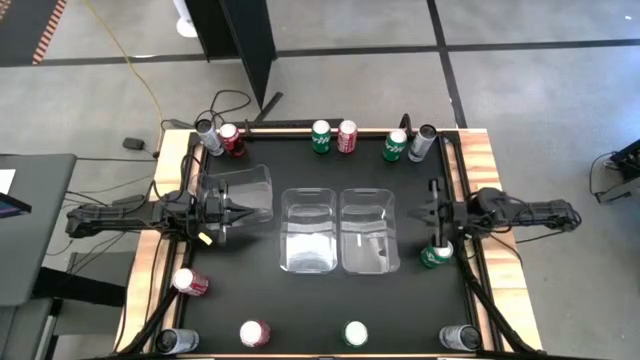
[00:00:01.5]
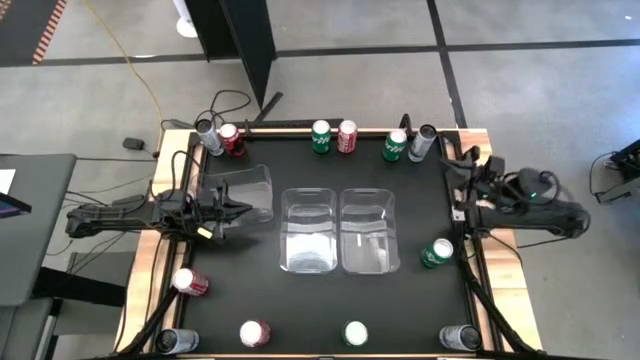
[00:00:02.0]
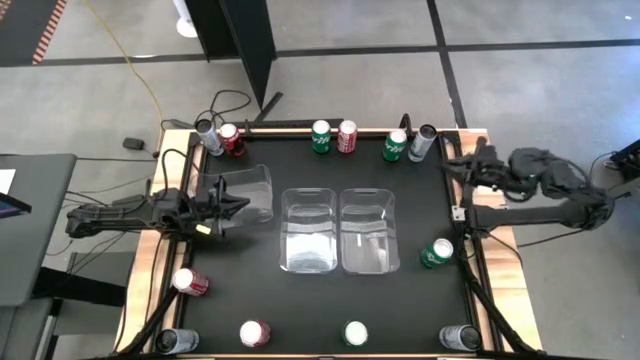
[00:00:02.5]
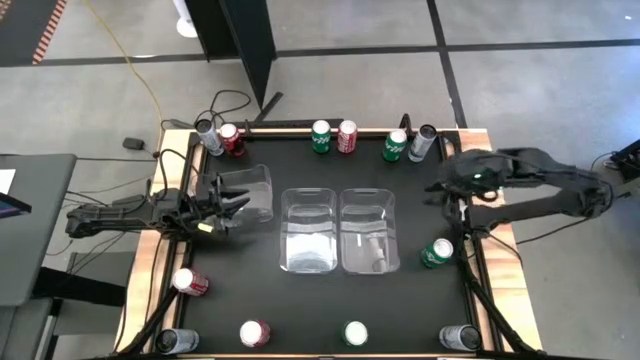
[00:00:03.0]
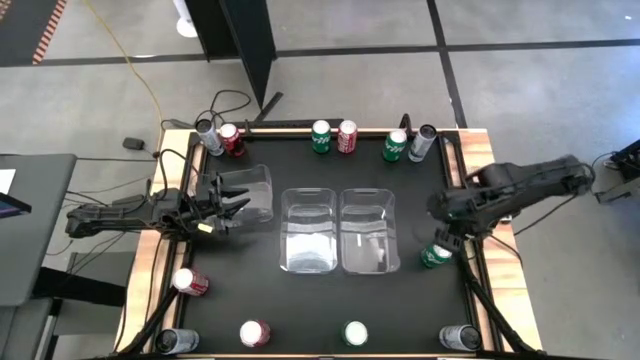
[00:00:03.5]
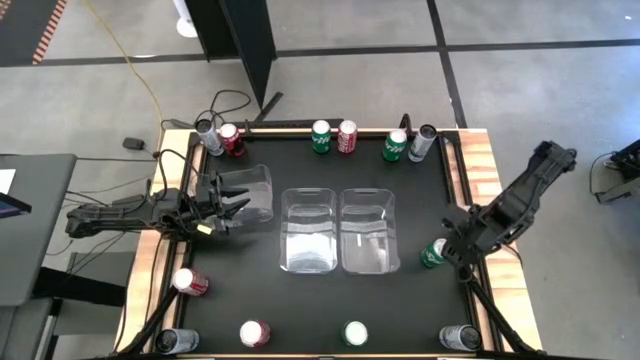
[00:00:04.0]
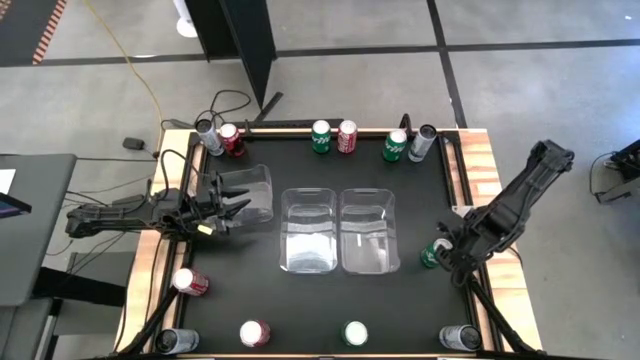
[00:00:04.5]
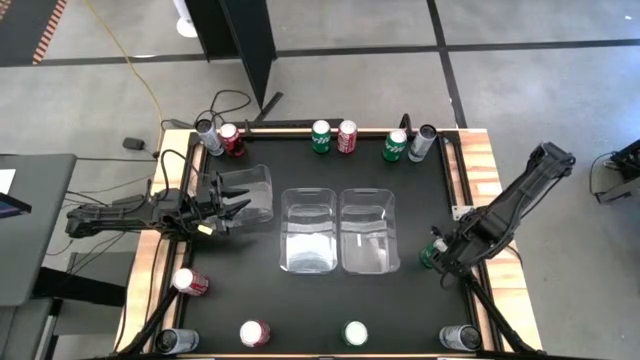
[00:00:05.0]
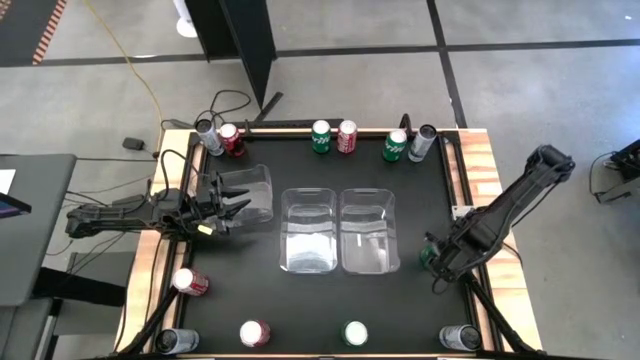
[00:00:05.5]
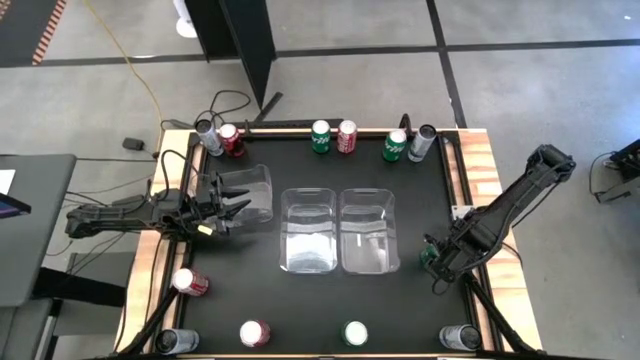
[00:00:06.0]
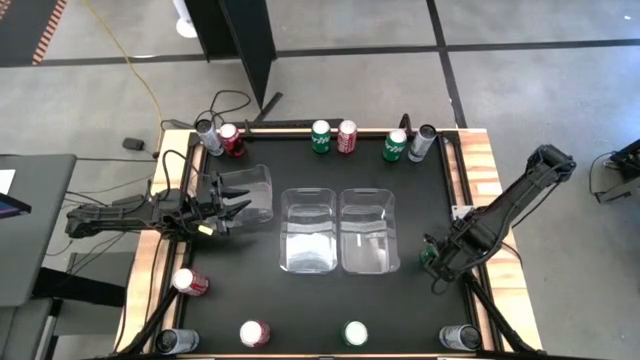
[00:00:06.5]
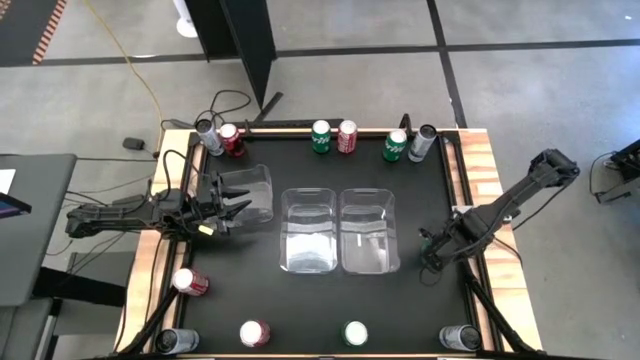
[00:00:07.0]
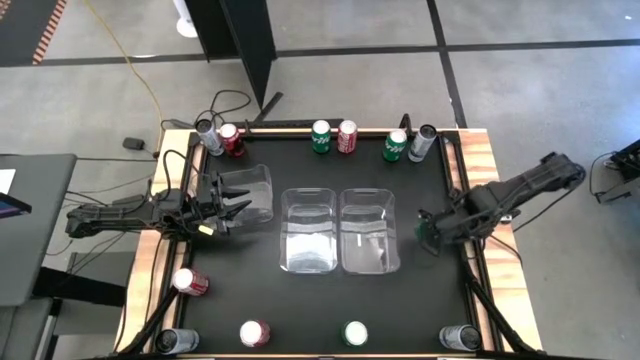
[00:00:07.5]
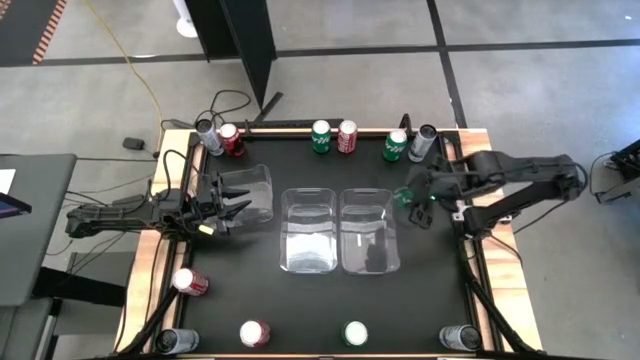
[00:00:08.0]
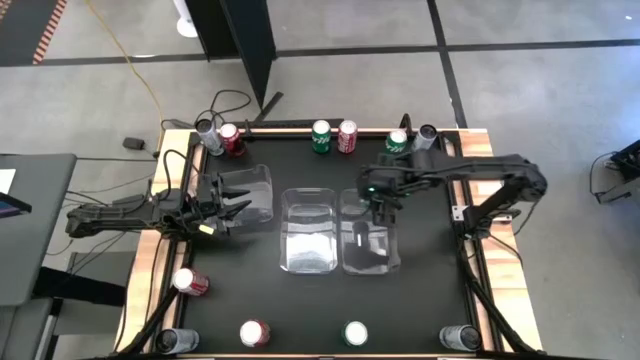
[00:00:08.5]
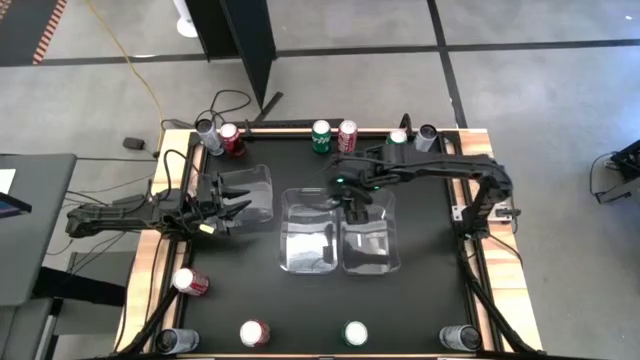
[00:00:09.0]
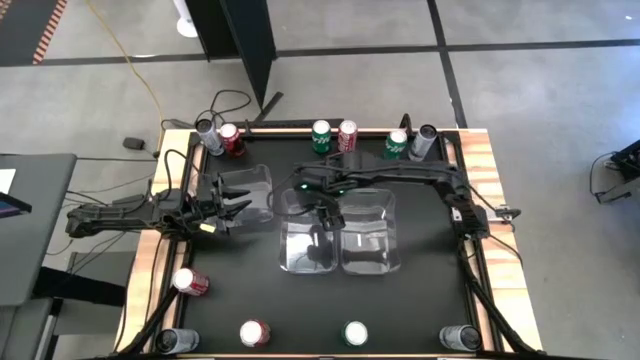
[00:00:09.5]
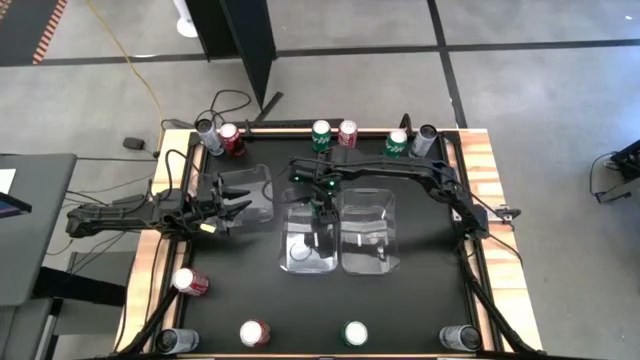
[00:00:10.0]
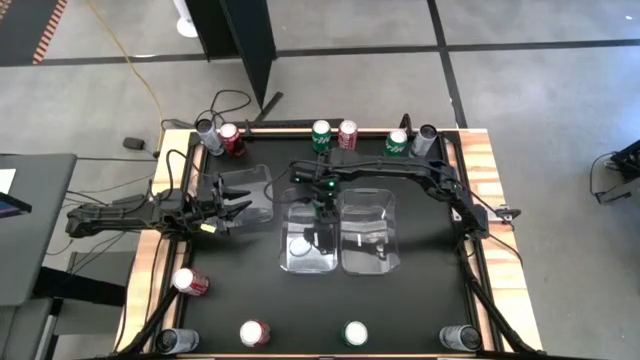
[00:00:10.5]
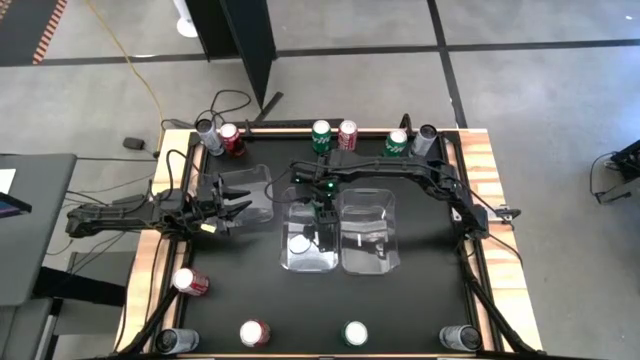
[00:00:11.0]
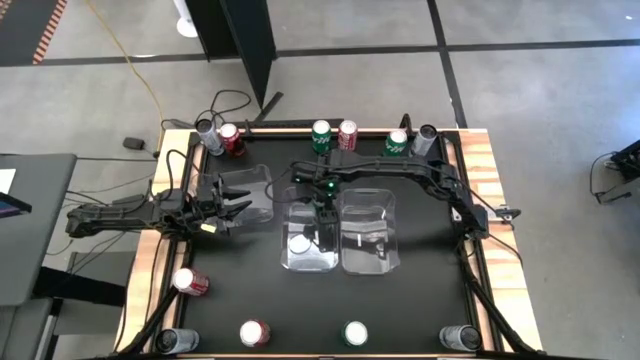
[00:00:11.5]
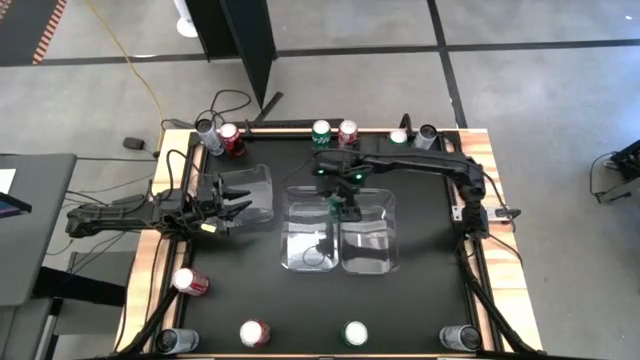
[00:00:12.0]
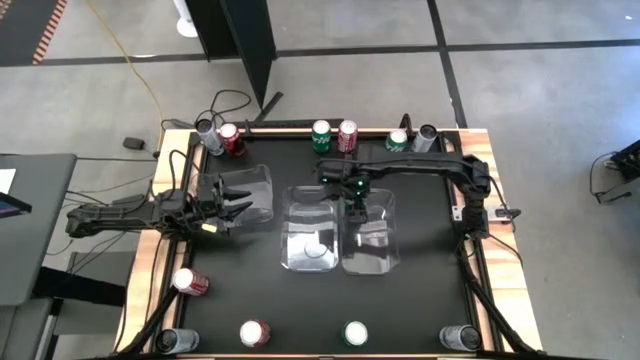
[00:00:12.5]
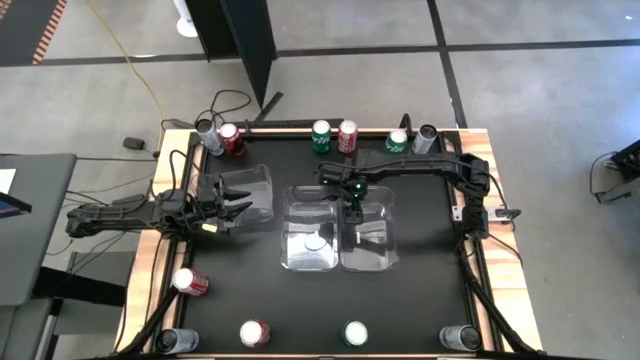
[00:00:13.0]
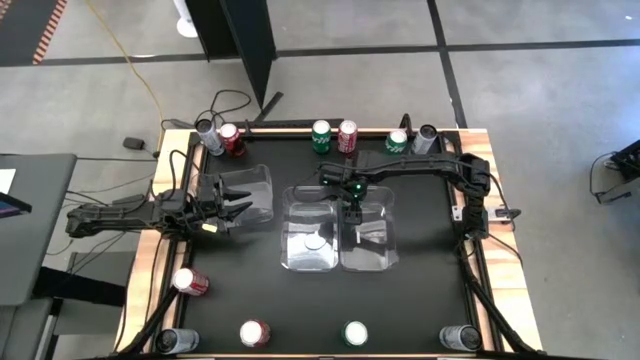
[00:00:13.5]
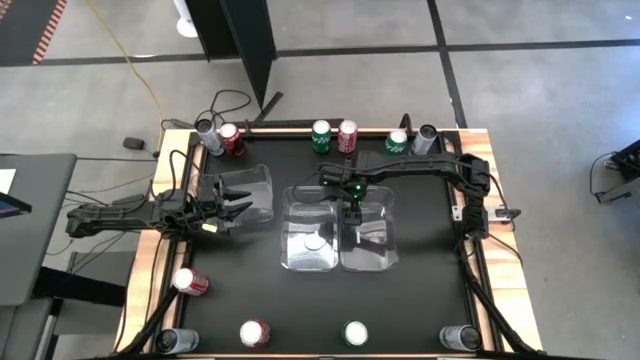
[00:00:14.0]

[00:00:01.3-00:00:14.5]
Task: Sort soda cans
Put the middle right green soda can into the right transparent bin

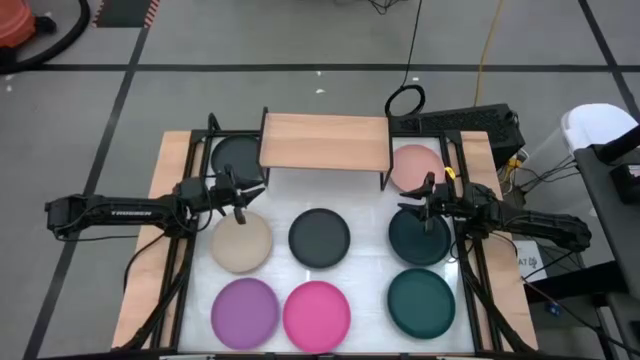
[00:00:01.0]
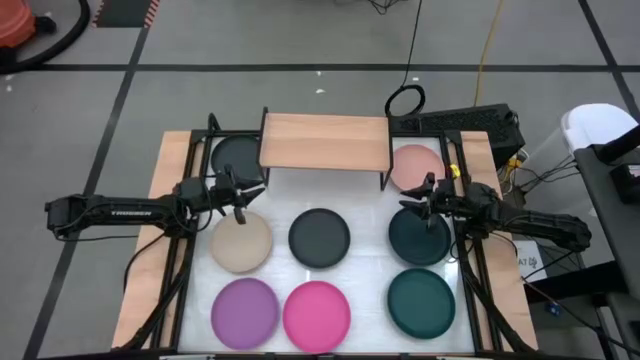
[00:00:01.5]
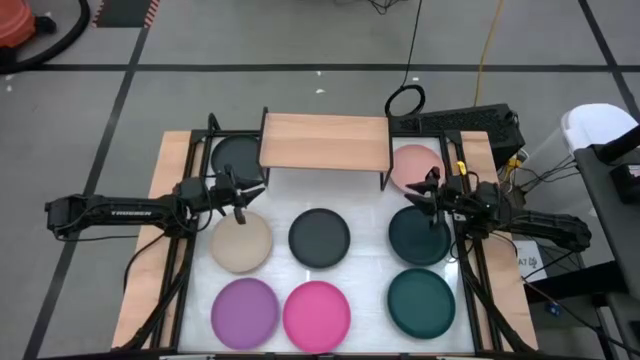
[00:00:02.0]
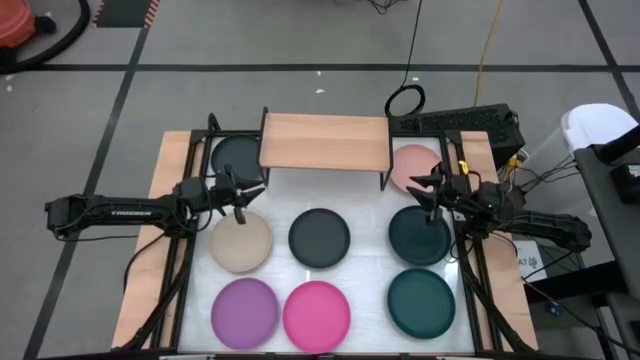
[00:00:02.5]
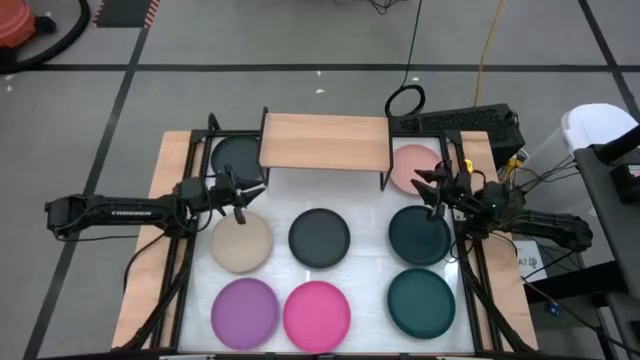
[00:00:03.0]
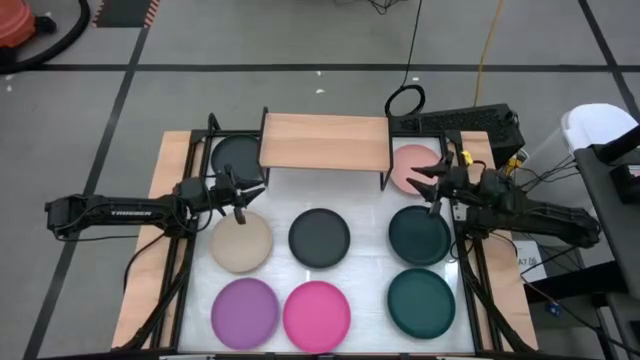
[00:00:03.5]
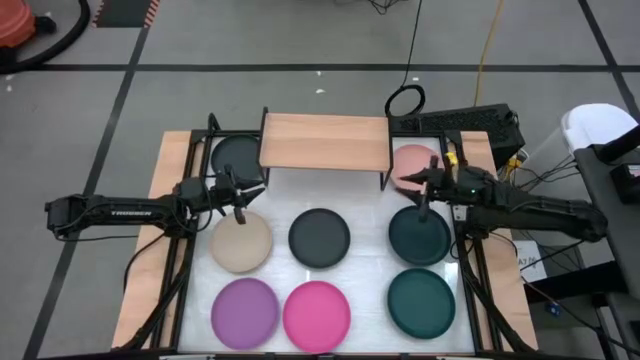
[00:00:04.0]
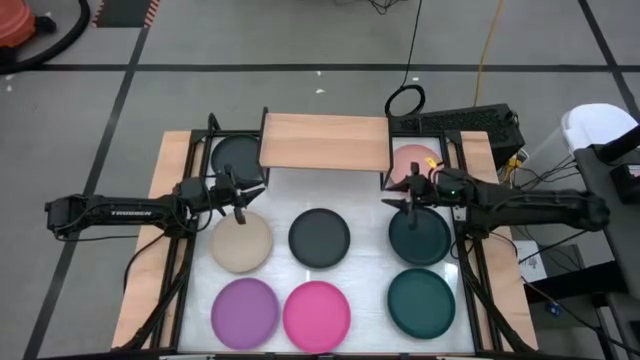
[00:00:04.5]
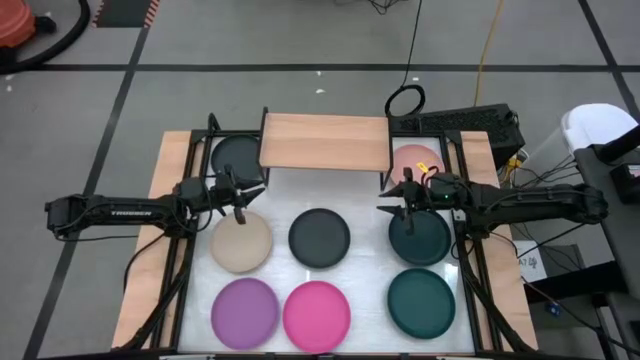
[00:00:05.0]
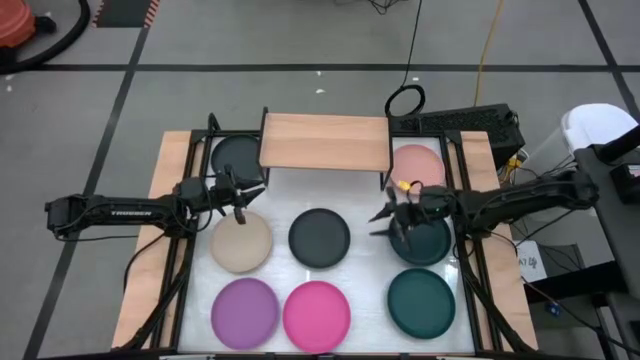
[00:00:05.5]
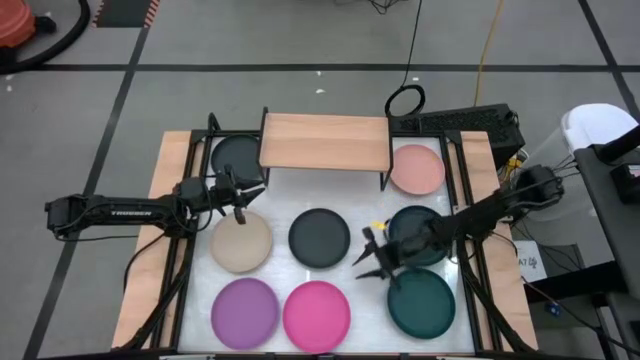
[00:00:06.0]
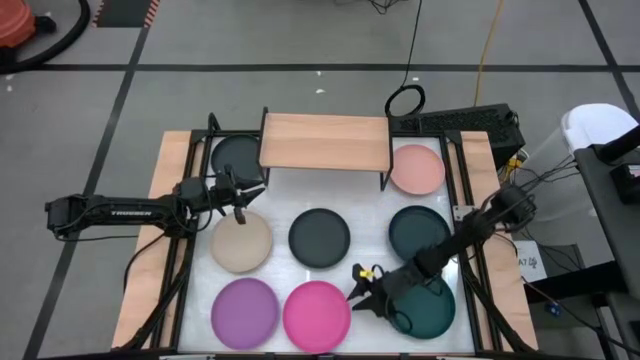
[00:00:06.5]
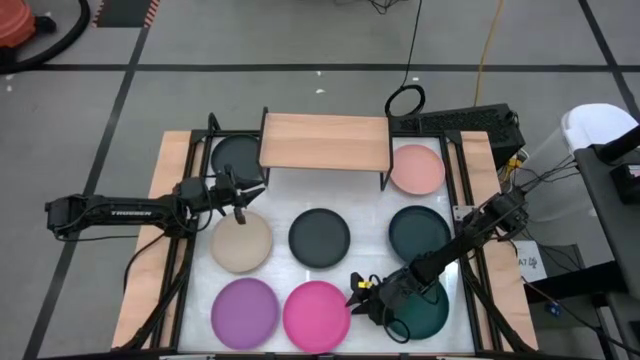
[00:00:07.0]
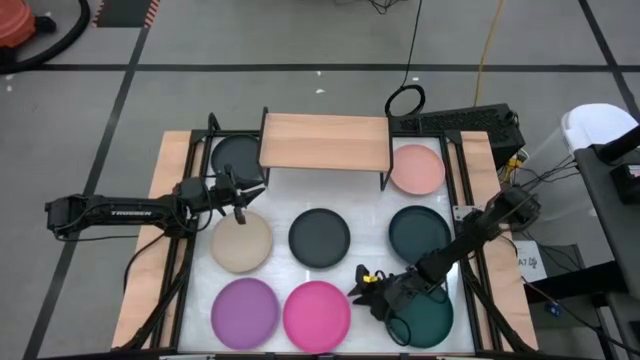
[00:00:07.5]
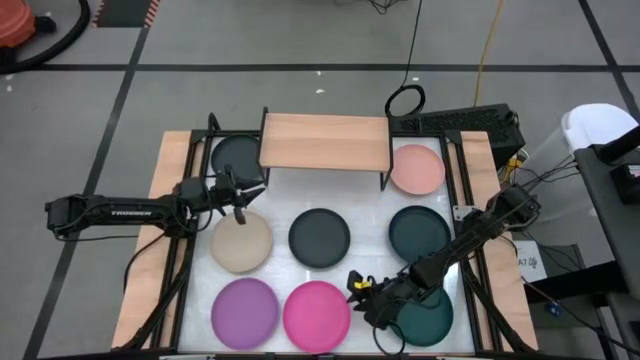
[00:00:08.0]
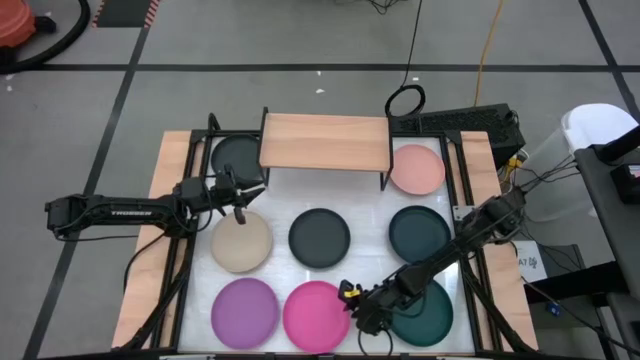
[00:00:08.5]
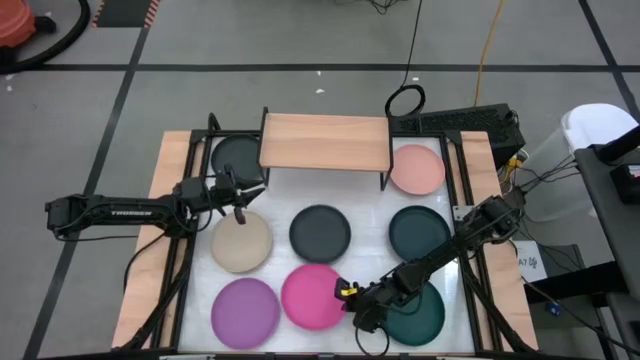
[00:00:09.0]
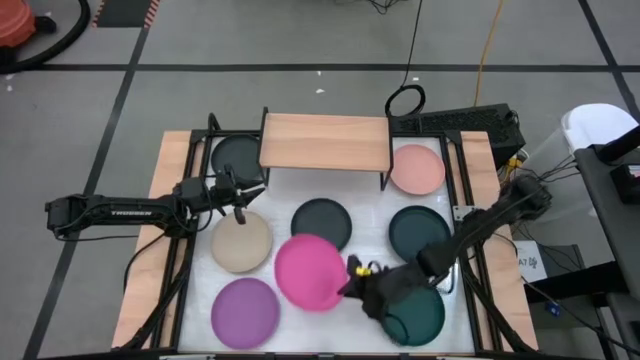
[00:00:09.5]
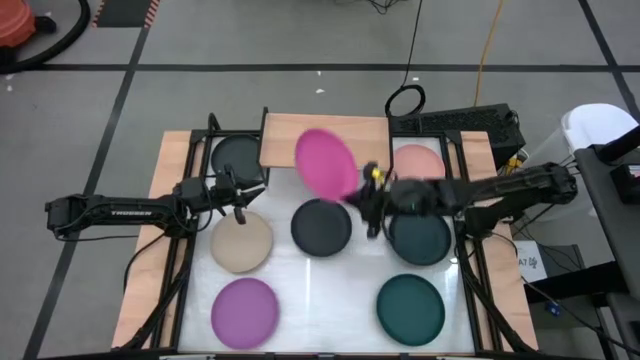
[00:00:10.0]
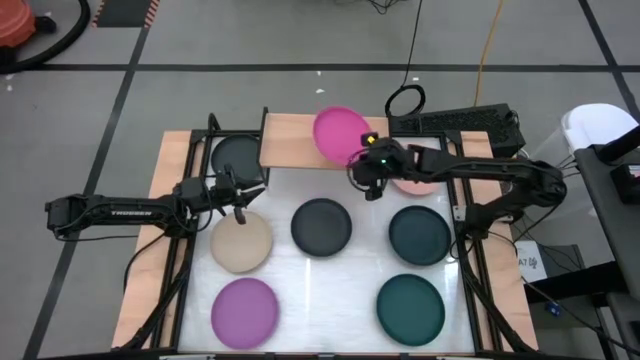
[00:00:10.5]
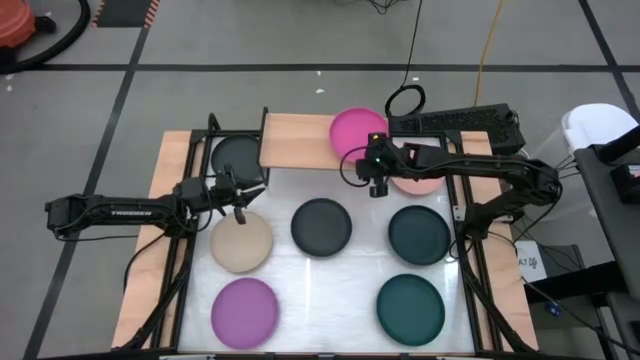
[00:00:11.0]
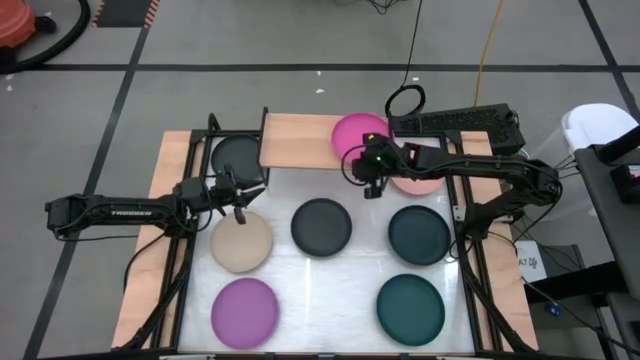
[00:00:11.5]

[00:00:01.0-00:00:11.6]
Task: Place and stack plates onto a shelf
Put the pink plate on the shelf
